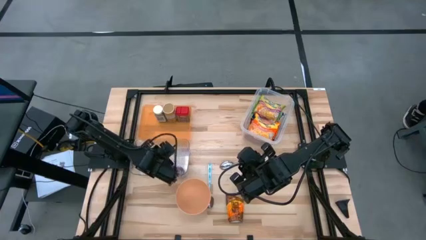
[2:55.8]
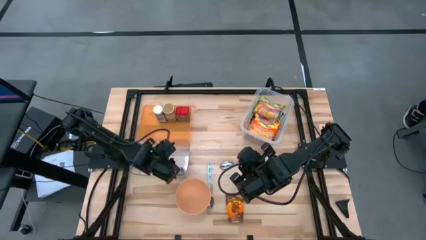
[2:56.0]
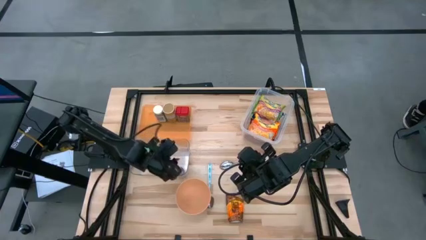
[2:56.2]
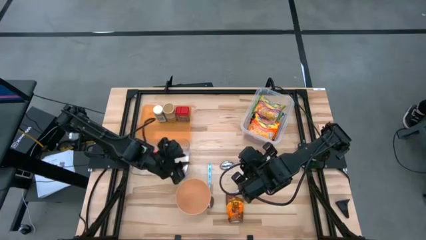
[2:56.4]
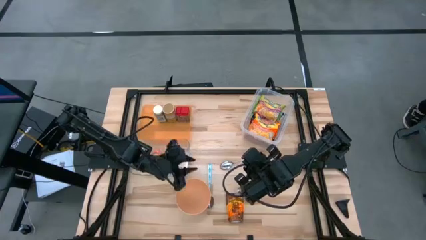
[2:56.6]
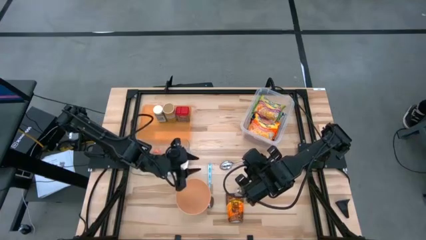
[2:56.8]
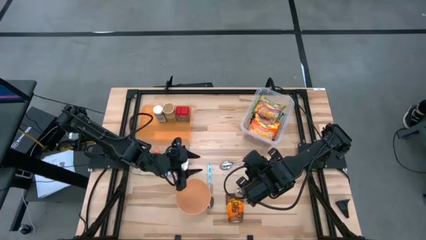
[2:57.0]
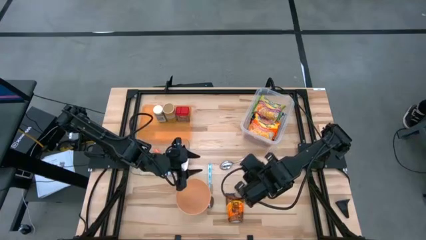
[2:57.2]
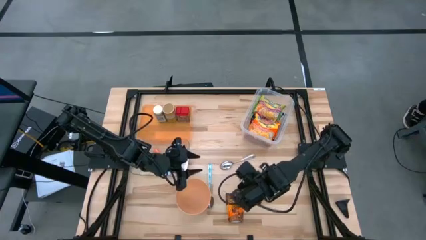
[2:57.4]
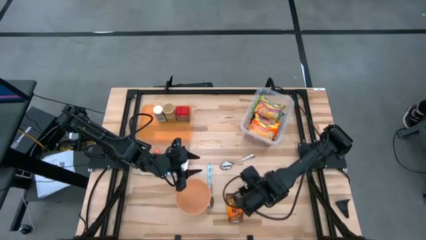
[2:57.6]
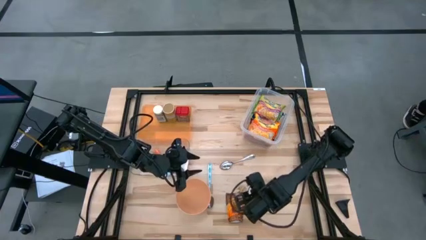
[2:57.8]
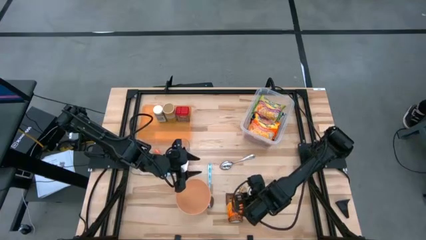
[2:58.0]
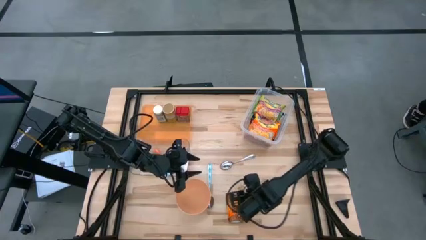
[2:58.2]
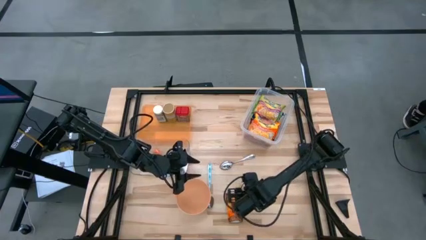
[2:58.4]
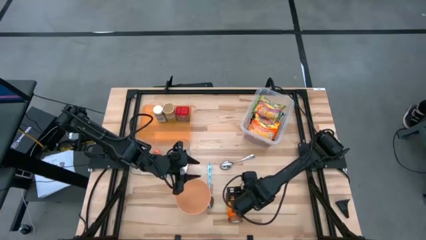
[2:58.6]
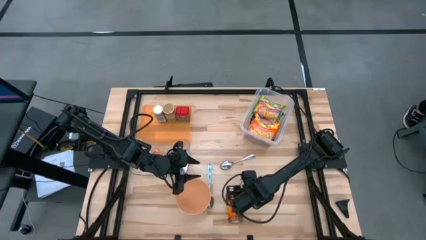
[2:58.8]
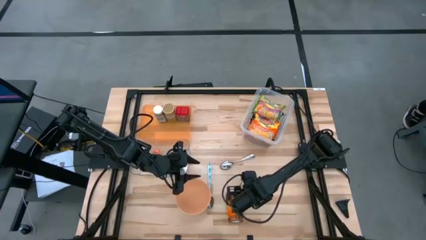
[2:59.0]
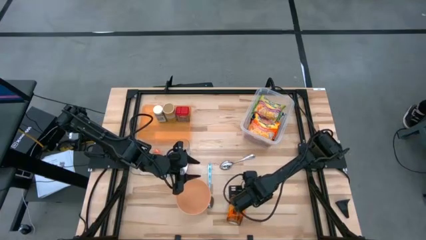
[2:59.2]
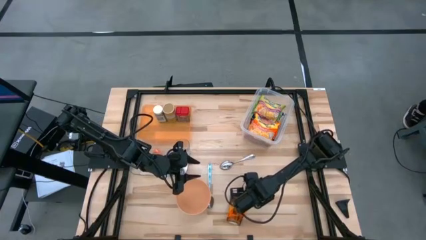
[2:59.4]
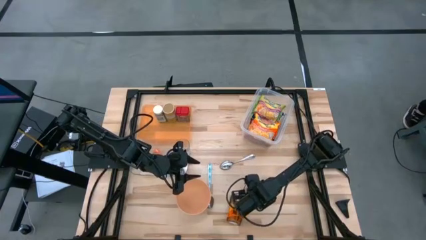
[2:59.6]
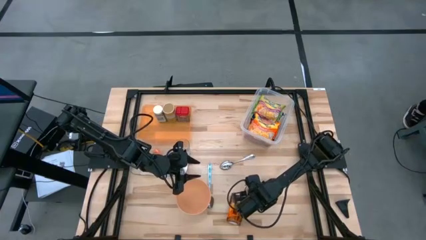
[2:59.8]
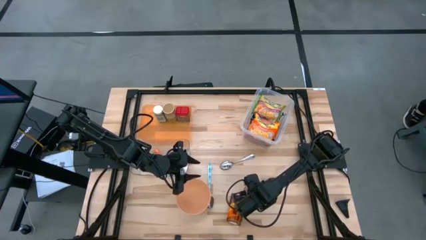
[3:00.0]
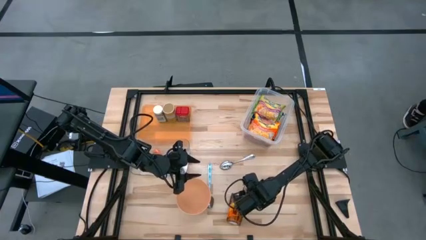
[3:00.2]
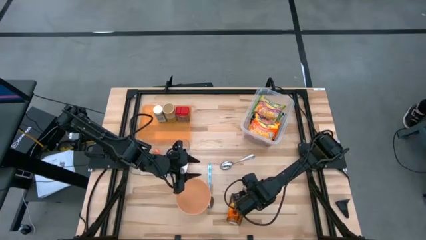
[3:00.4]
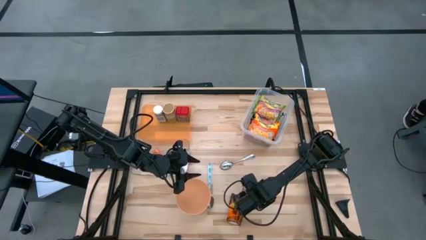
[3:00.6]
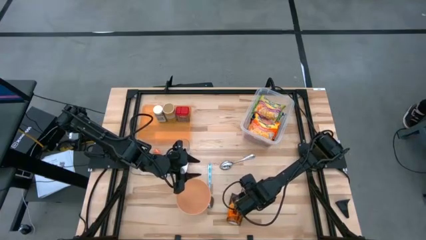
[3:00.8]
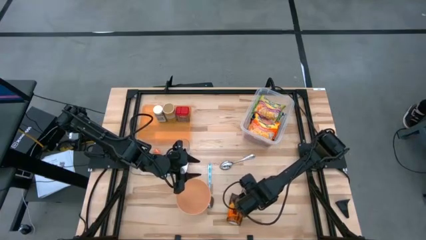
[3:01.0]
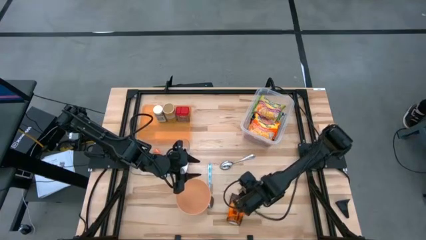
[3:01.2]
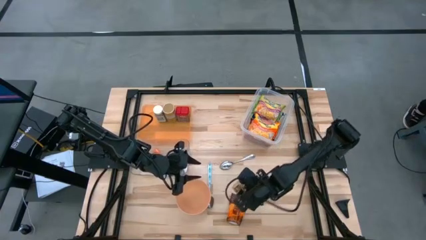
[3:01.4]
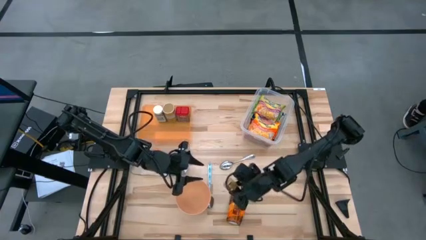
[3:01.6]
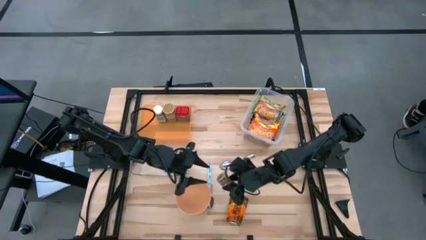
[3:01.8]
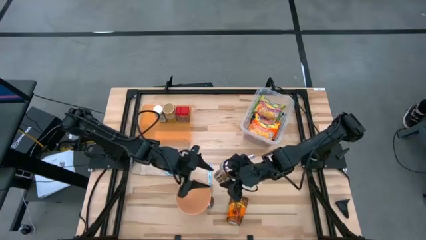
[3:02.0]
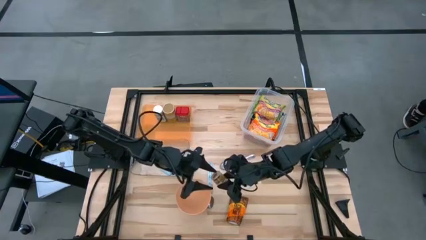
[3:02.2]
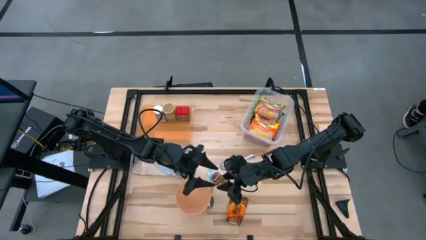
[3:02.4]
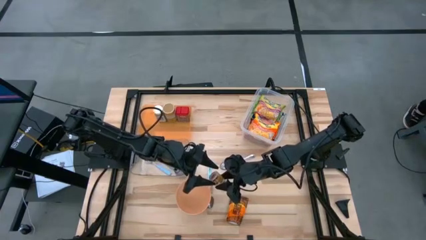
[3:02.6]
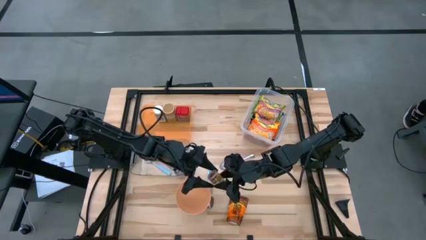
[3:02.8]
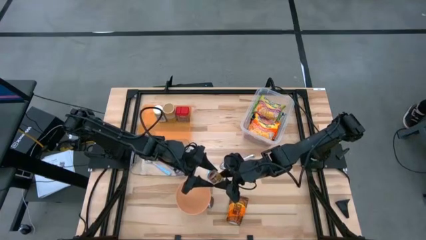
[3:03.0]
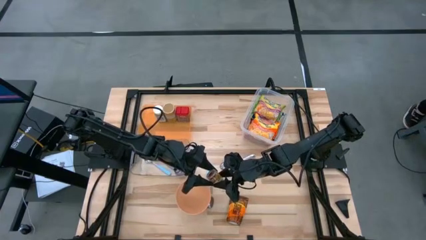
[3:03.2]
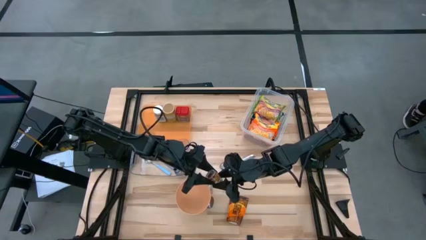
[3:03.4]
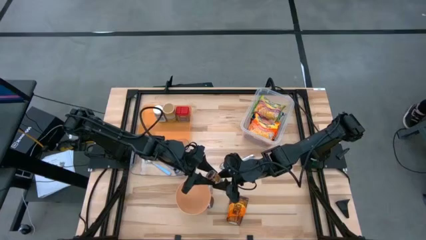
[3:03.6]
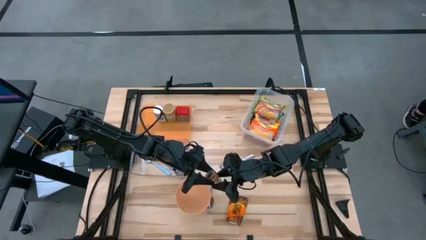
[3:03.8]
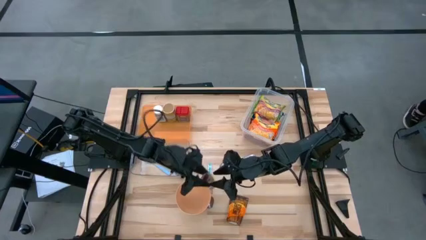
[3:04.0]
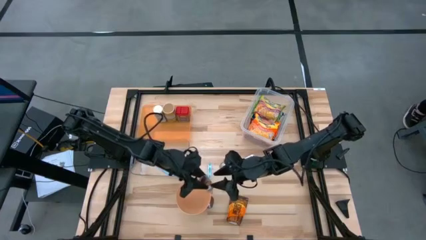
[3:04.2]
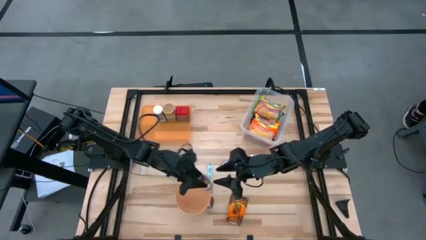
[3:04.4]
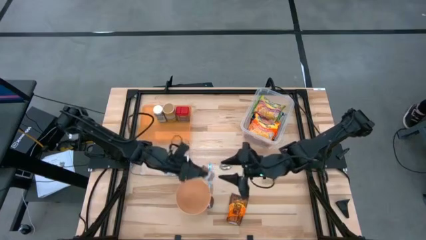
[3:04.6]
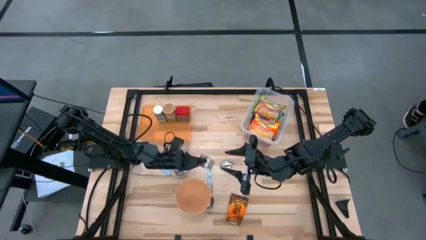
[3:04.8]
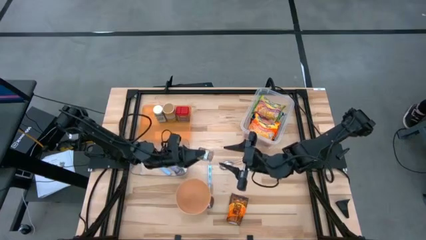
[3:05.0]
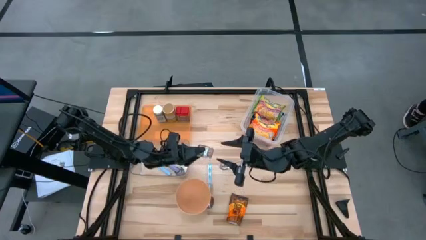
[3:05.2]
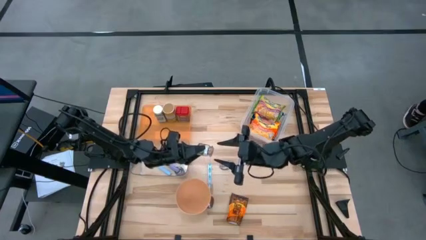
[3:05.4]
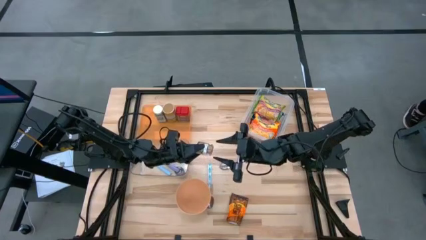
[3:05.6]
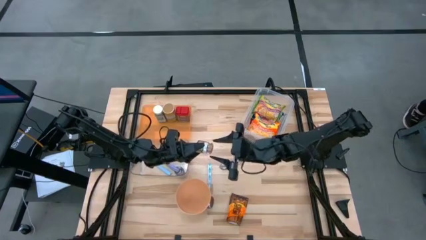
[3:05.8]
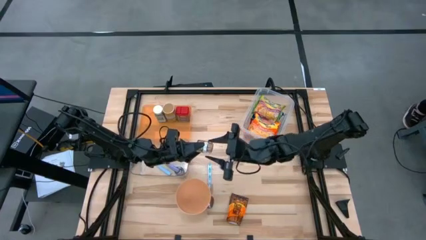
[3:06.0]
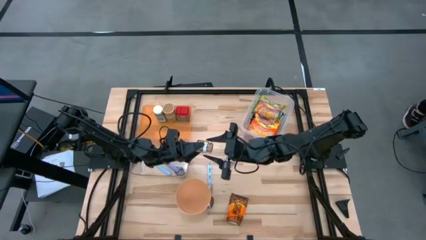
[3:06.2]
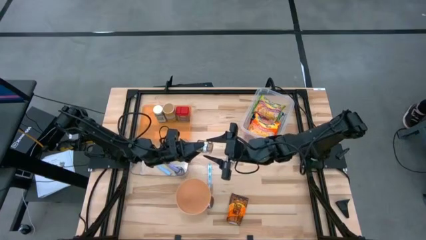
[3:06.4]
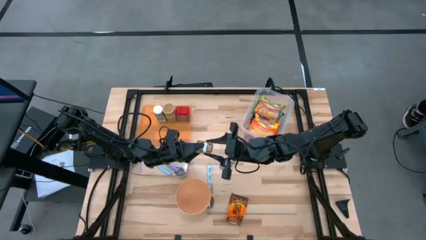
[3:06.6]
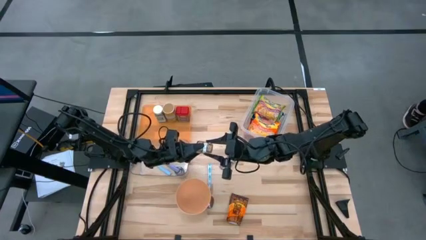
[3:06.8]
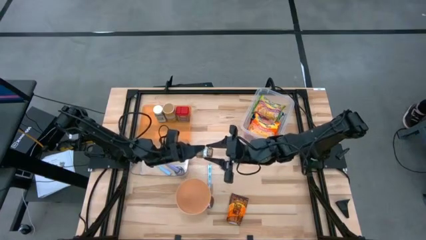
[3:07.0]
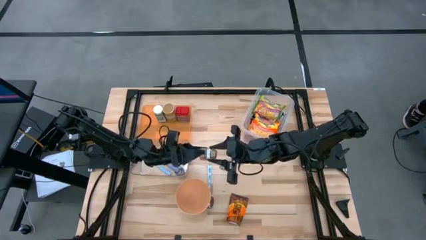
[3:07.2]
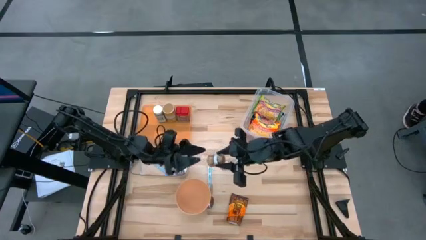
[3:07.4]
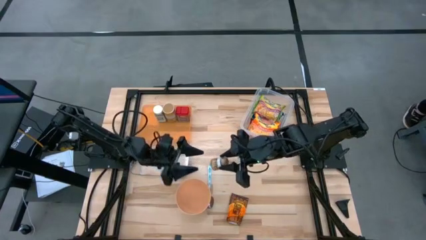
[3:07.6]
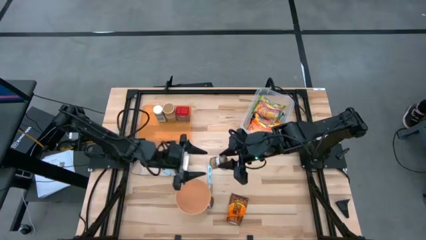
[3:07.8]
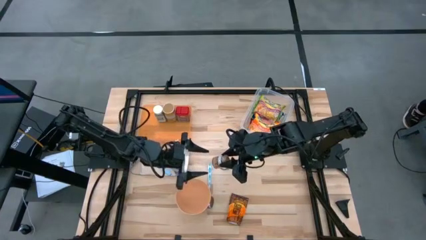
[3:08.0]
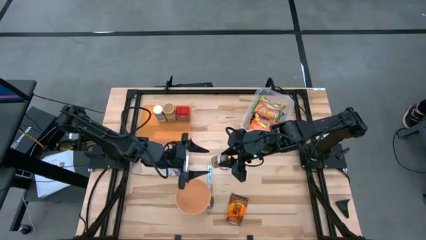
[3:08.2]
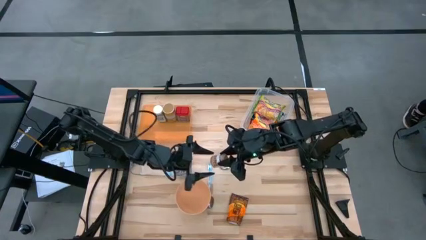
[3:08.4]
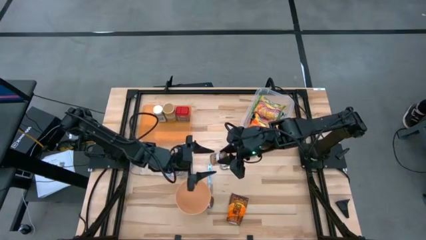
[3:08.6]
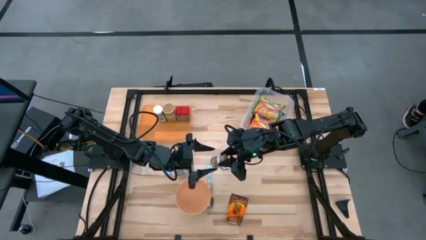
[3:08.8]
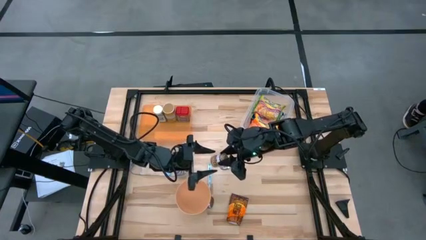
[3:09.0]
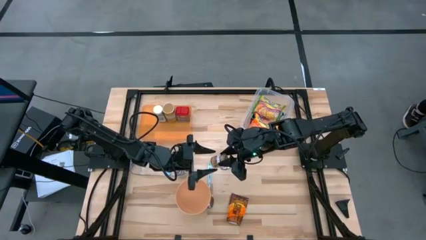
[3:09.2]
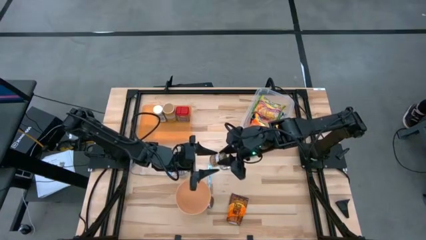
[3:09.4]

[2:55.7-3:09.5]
Task: Pick & Place Food Item
Put the brown seasoning bottle into the orange bin
